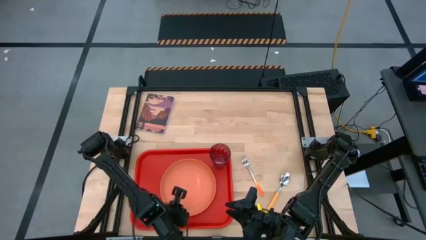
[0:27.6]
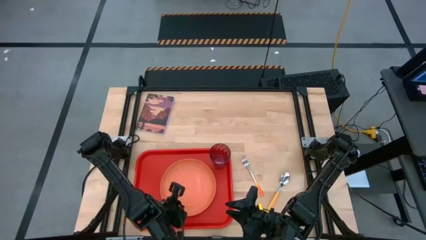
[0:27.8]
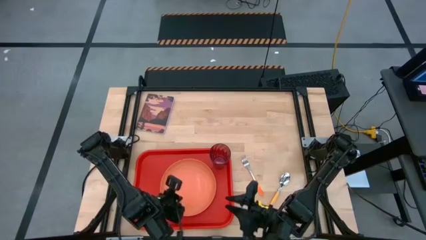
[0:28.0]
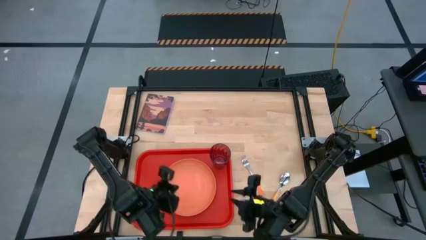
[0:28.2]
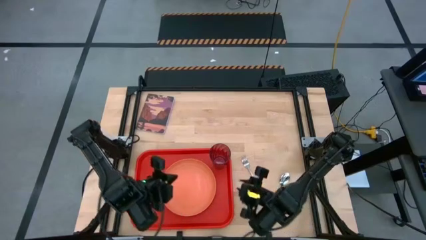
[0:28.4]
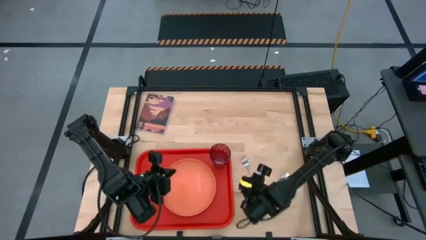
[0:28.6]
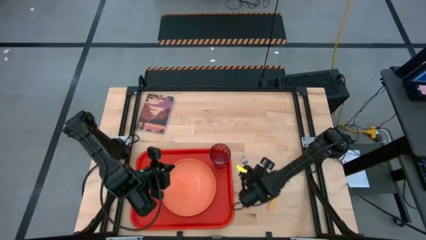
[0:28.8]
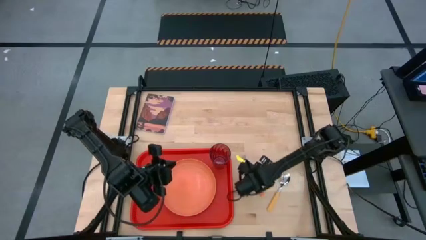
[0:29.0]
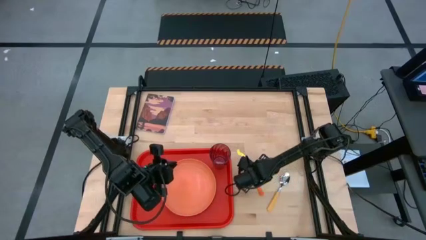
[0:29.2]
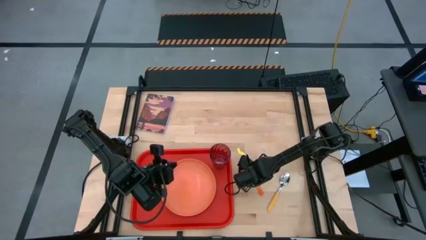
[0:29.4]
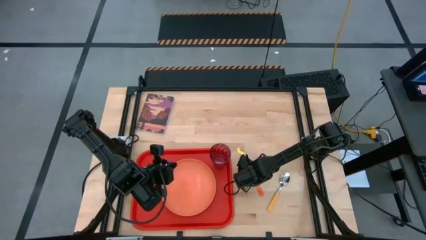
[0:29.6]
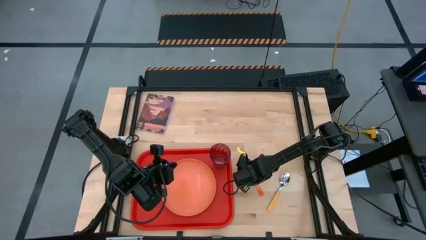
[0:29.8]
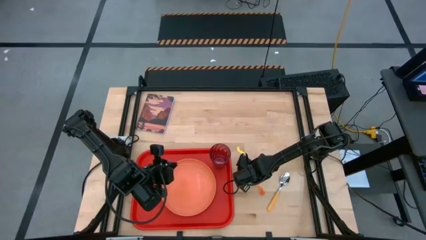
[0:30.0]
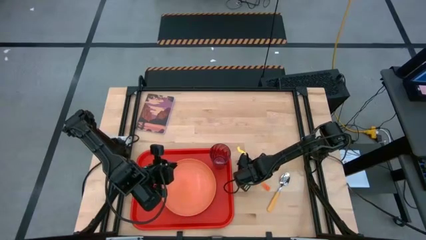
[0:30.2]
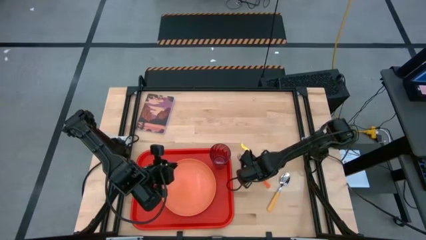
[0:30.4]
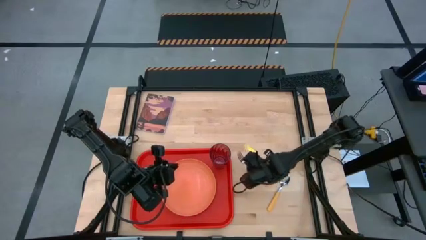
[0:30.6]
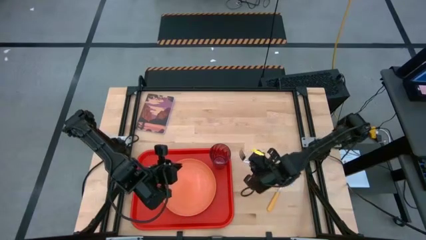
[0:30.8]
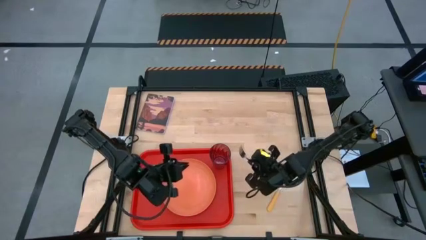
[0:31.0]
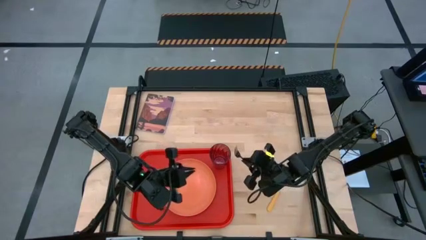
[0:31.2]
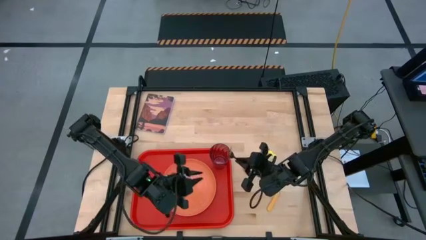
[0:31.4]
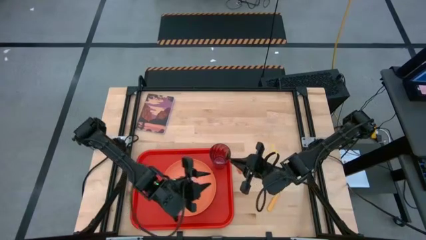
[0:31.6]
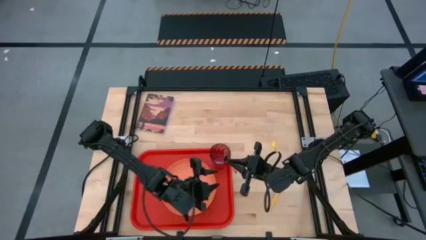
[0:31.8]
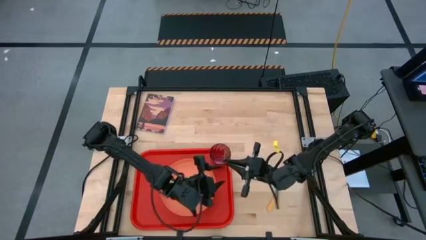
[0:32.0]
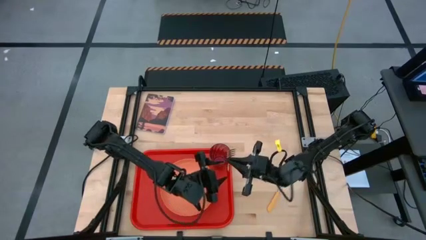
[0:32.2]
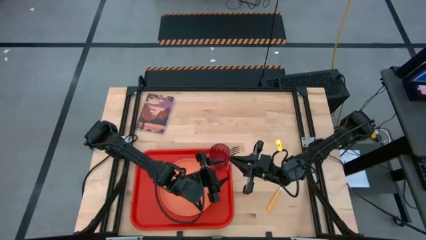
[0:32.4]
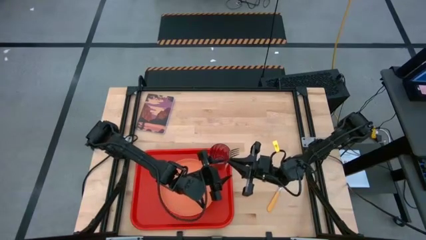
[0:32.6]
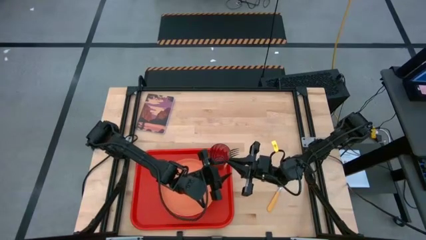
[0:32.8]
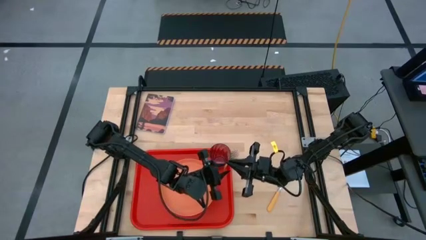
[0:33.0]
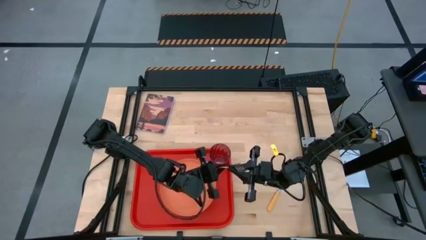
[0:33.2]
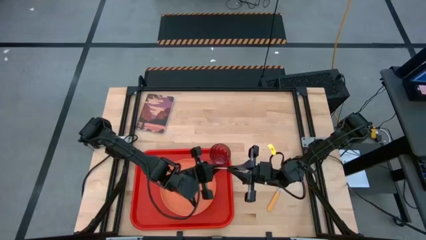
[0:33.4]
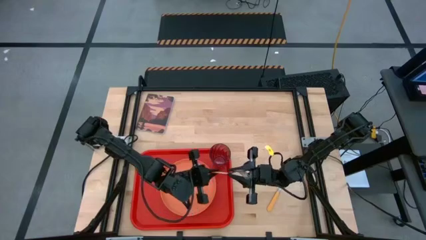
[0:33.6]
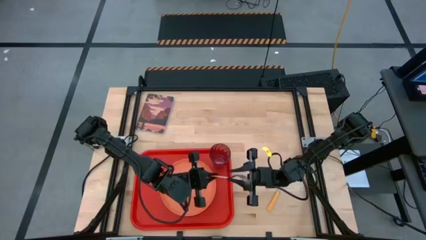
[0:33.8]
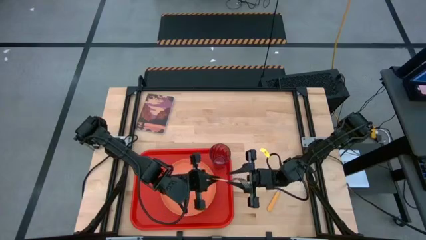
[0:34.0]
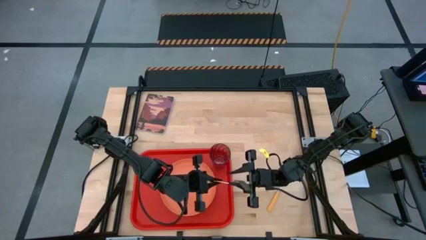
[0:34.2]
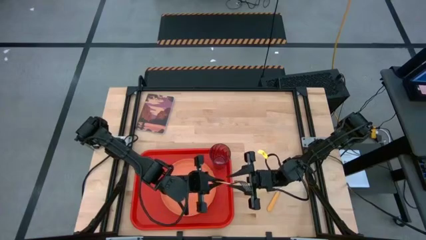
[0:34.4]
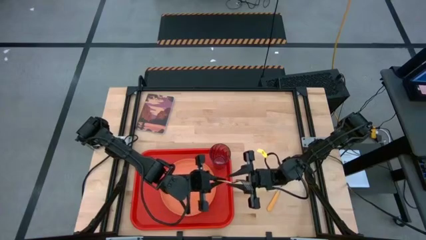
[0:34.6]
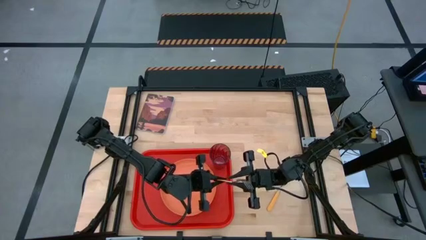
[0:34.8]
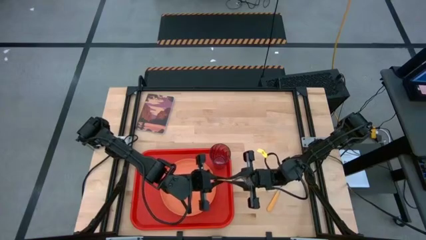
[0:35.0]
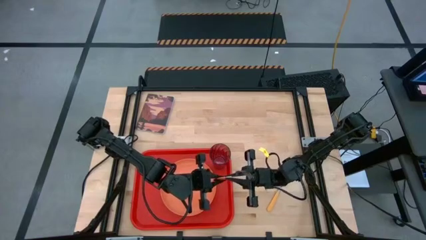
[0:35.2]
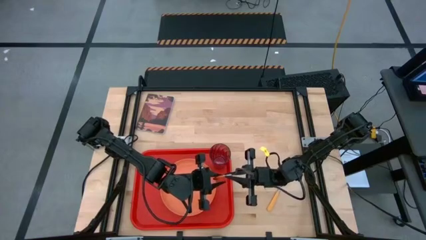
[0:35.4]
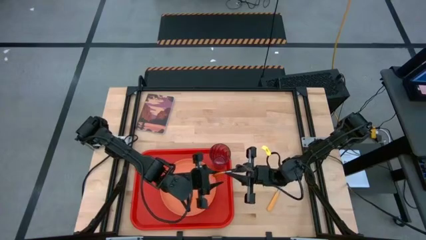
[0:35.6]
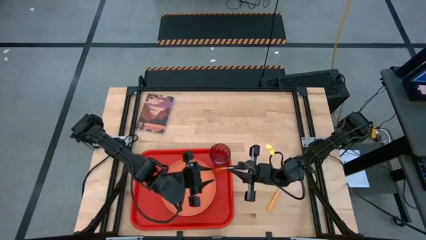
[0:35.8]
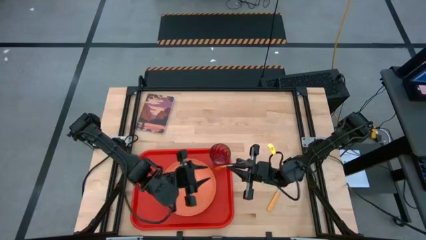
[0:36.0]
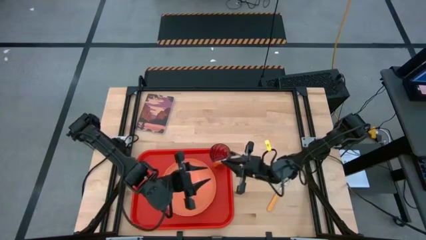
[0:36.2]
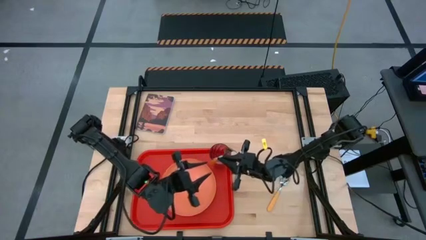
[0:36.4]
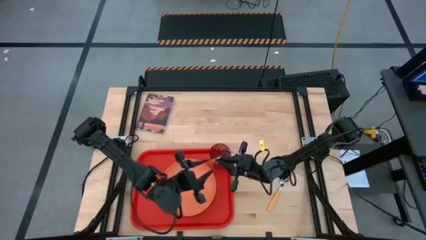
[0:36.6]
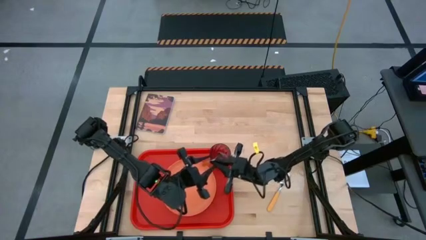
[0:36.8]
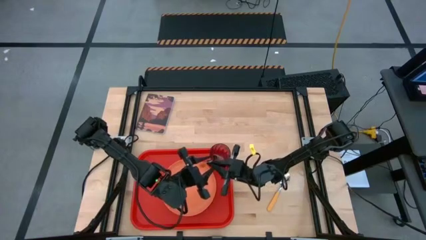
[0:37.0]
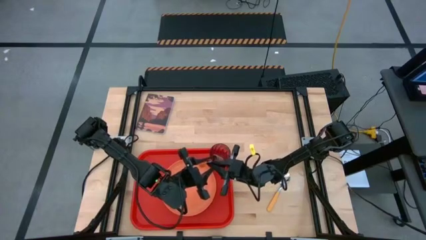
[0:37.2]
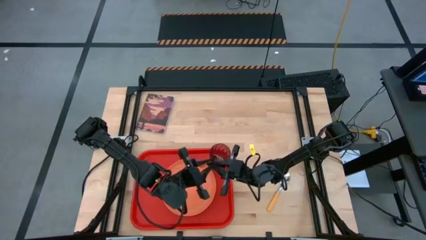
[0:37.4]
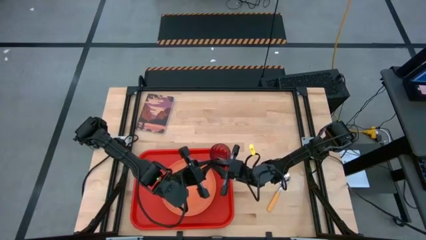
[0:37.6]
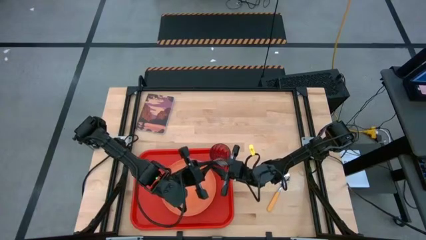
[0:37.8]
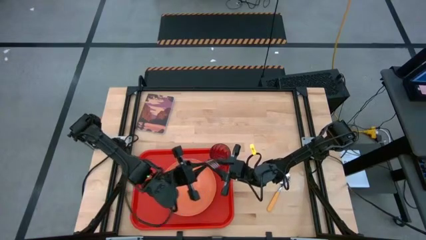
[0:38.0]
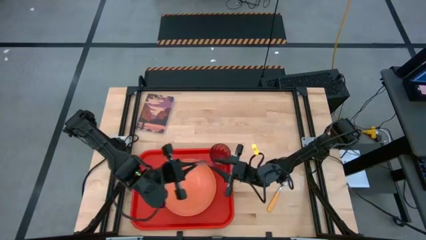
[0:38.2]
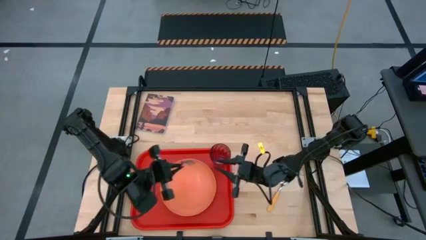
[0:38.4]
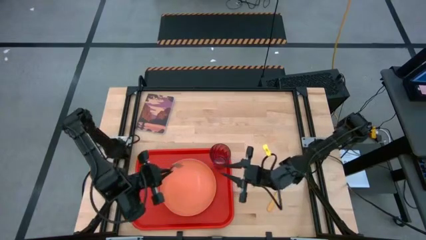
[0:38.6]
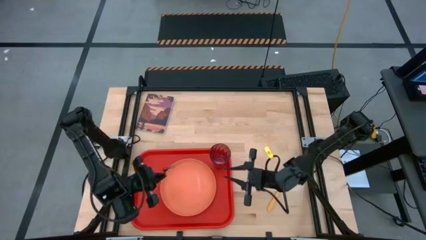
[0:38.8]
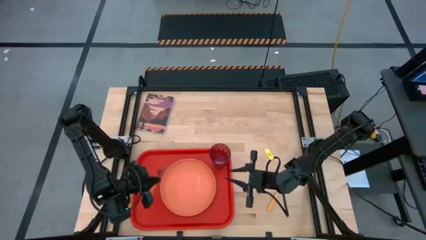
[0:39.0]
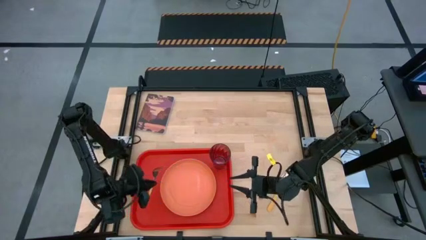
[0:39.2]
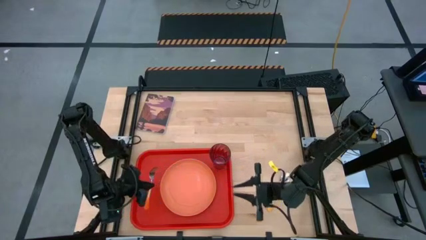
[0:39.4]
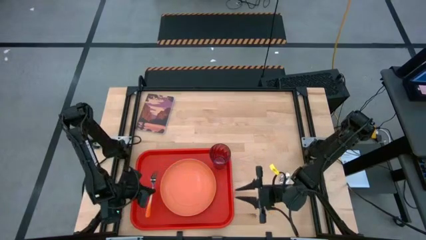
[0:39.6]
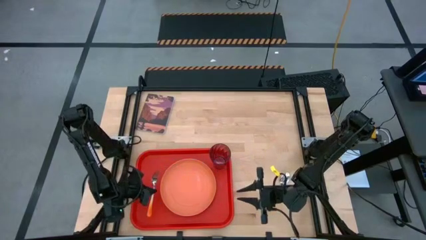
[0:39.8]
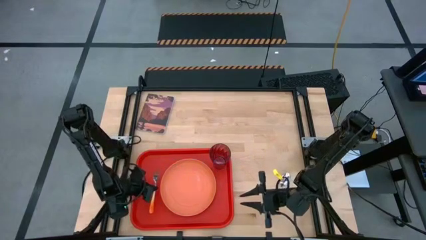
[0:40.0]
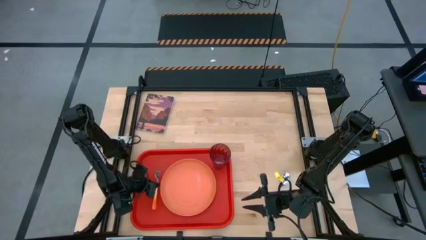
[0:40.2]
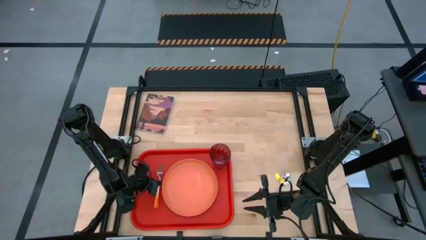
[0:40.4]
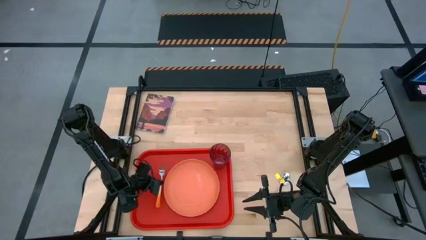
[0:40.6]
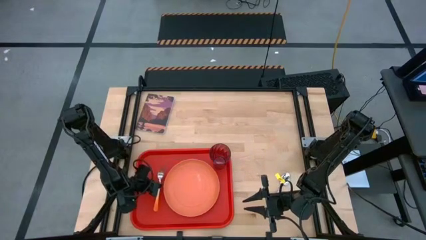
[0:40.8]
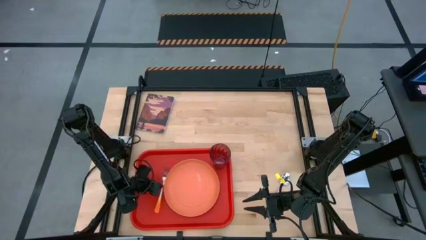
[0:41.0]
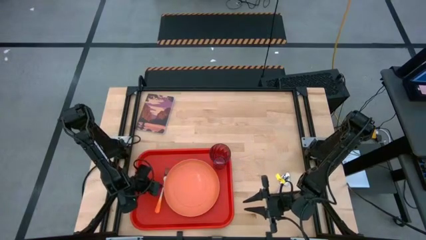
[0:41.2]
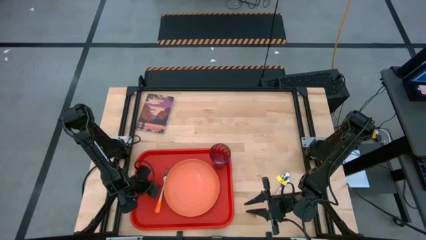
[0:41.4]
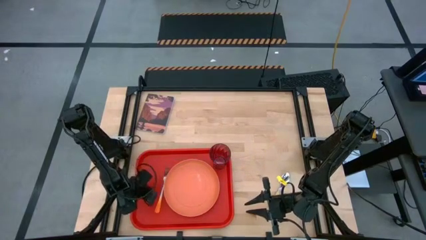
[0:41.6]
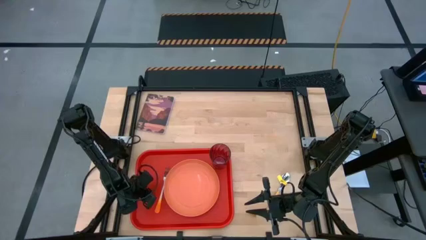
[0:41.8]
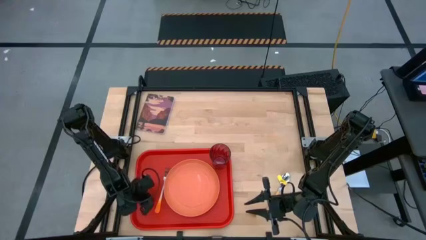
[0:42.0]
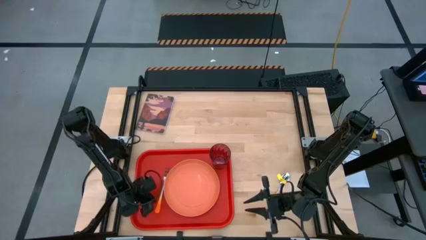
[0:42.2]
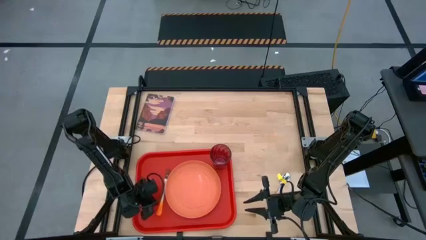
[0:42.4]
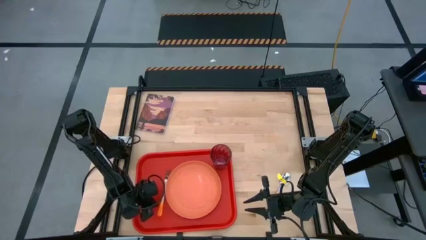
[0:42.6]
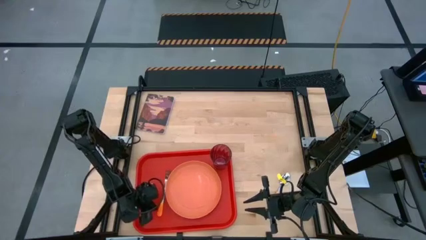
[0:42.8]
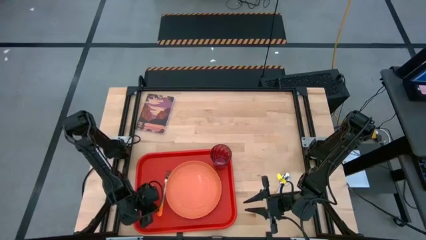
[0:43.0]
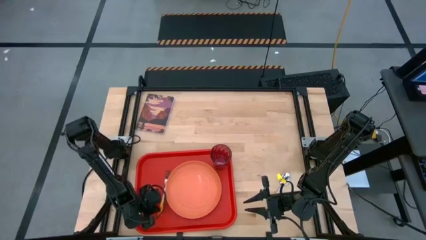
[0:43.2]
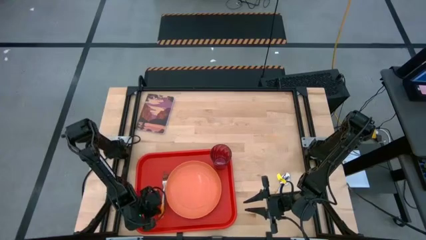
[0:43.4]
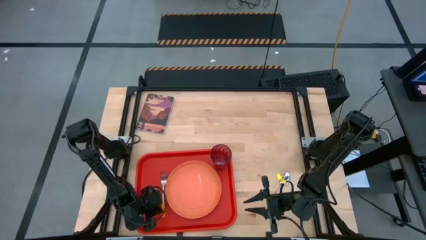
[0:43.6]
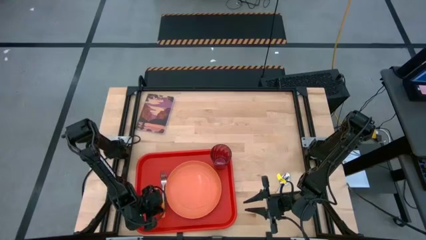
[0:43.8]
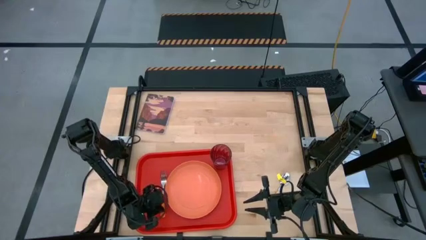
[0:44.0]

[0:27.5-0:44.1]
Task: Pick and place plate/cup/fork/spoon on tray
Put the orange fork on the red serving tray to the left of the orange plate
